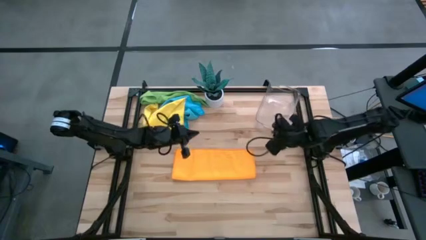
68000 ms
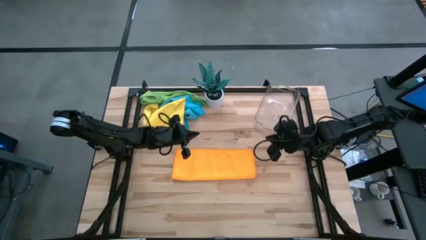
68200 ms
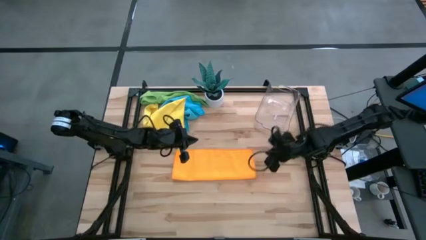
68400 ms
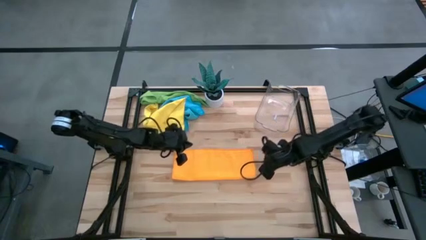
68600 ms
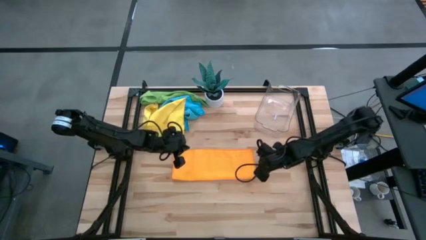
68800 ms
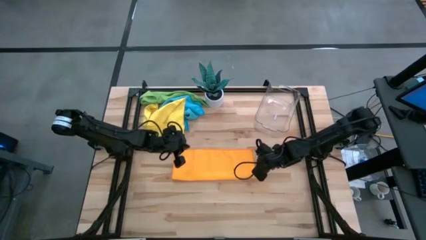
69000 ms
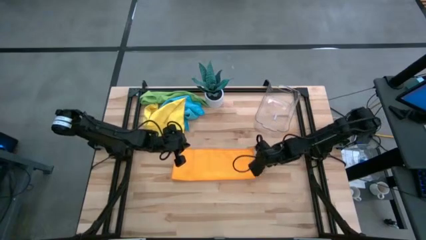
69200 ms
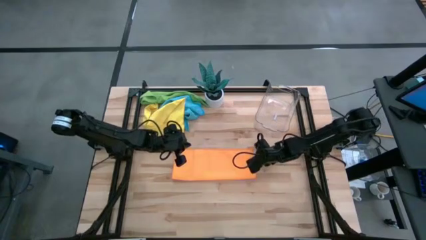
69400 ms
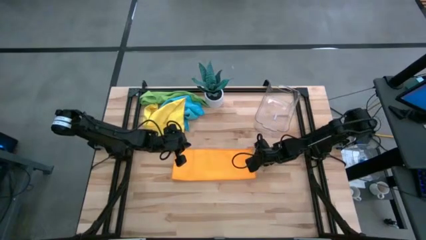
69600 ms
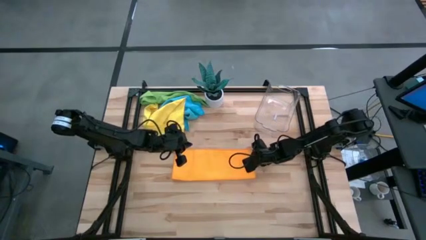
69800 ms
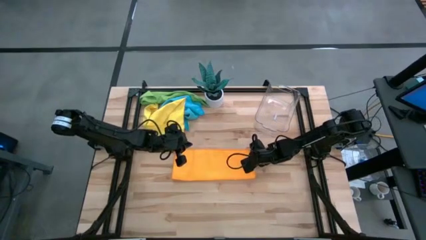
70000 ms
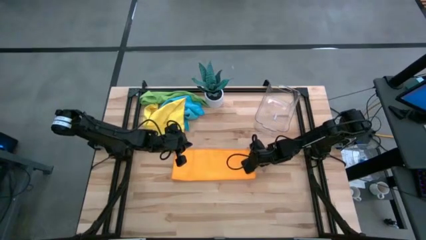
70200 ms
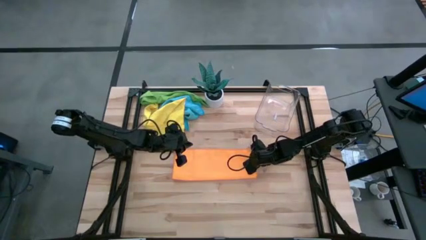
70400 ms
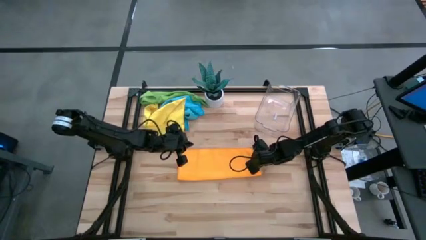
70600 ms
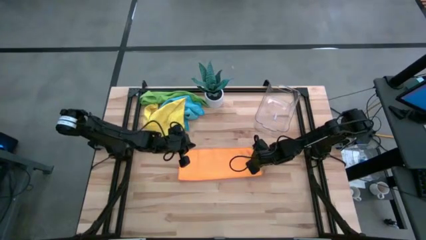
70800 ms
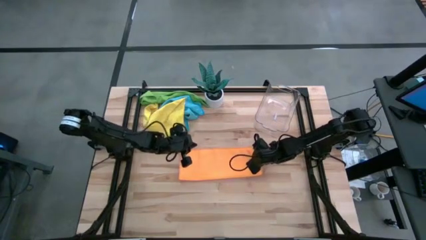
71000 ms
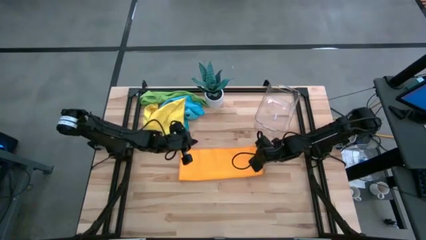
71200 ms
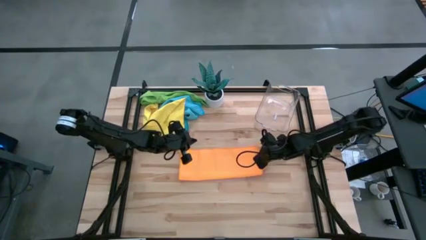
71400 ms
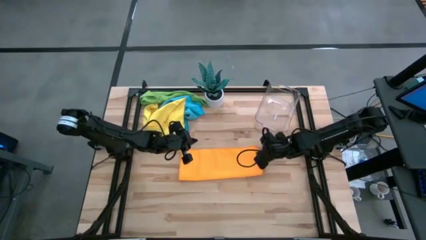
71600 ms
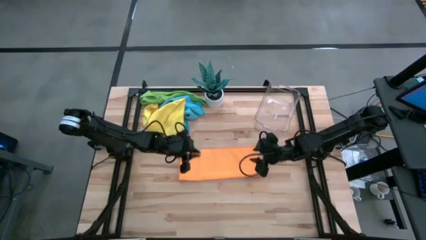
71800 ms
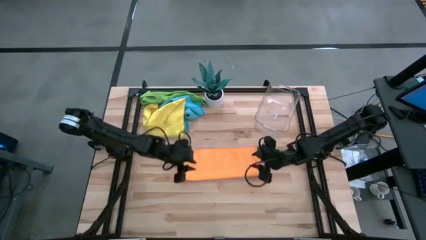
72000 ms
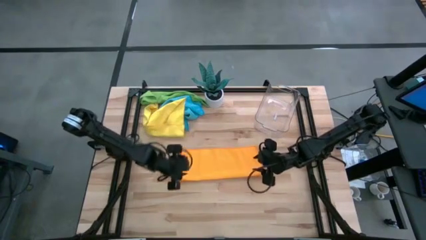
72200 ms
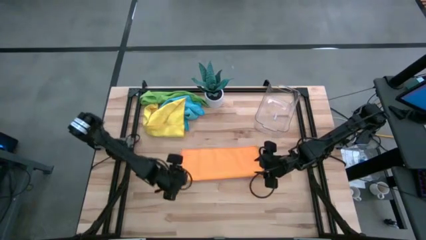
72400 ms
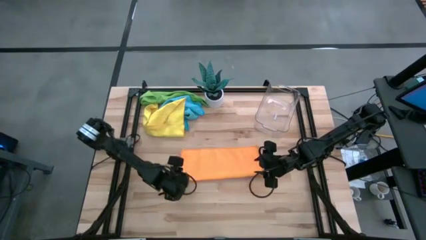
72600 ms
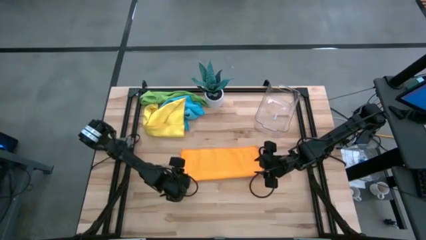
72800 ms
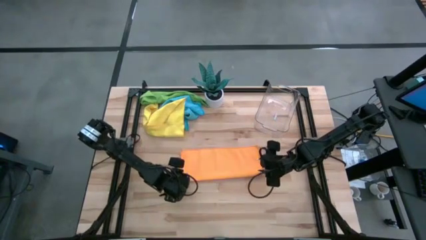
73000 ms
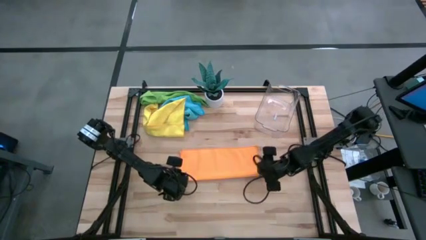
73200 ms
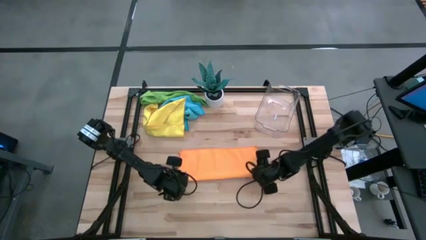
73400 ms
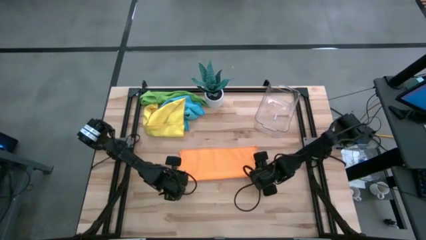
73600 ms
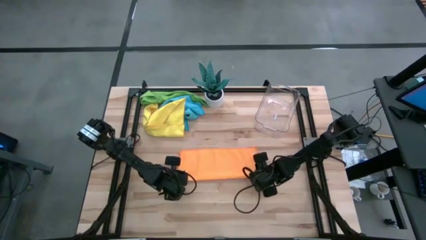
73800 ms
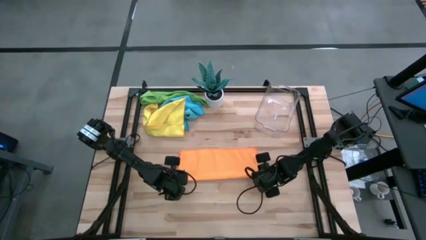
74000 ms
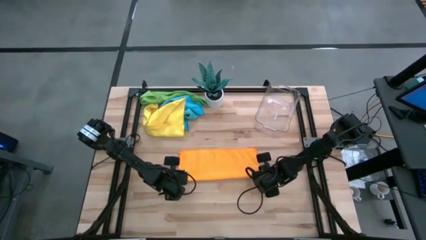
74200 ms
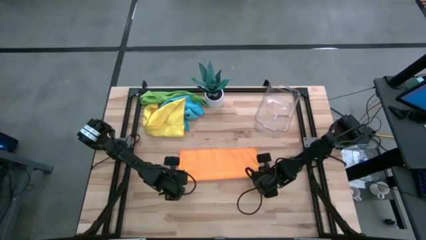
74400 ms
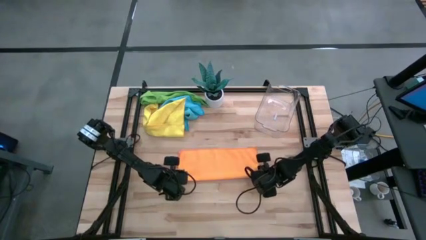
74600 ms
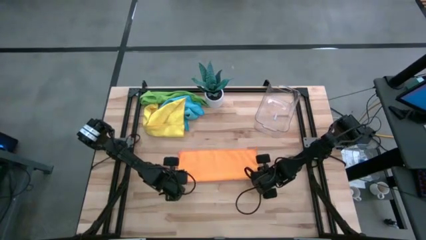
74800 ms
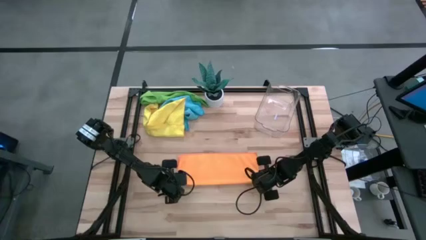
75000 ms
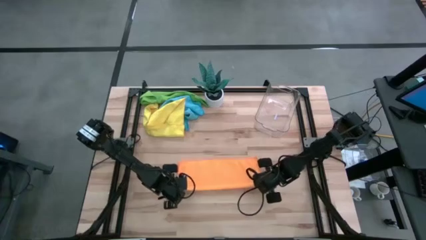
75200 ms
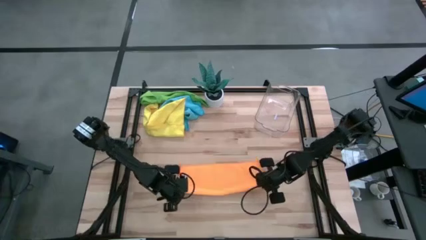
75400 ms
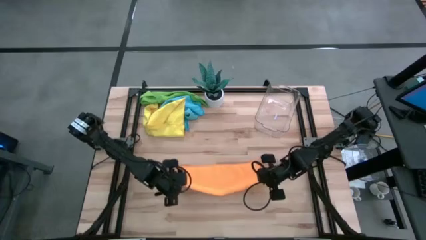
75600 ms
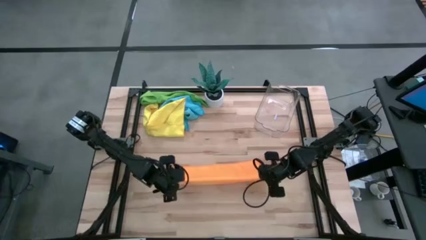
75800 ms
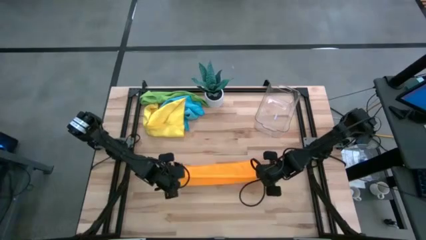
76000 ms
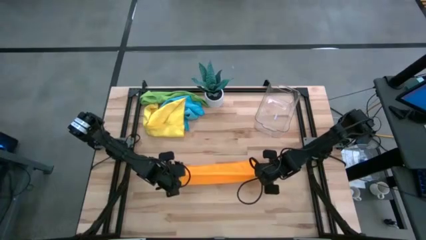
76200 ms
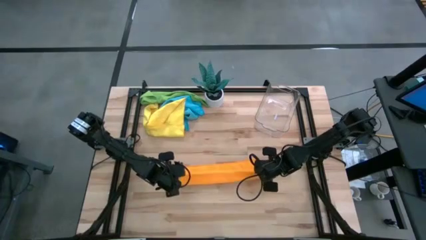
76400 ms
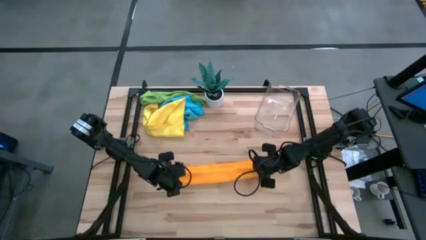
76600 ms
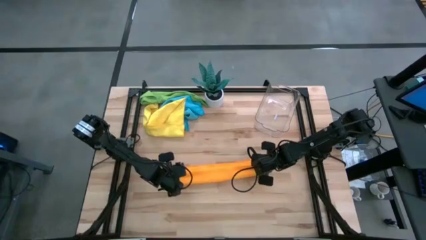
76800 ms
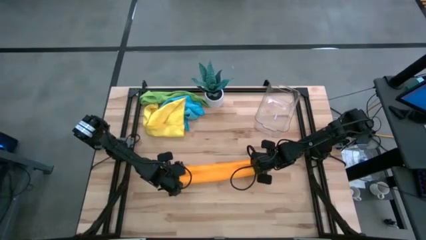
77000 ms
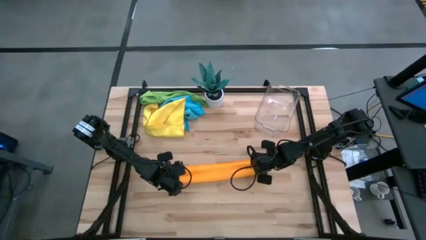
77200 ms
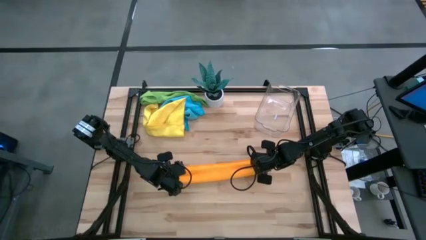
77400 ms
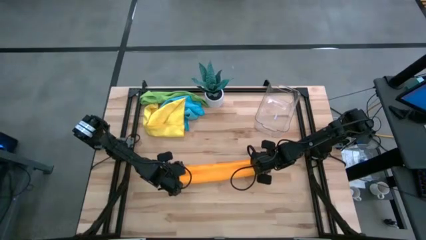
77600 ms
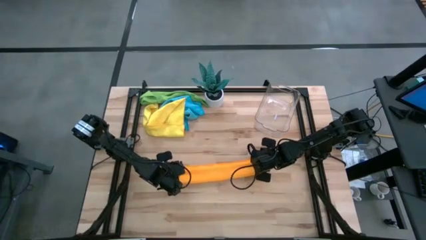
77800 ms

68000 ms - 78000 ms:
Task: Roll microfiber towels into tight, uniform cylinder then place into a basket
Fold the orange microfiber cloth

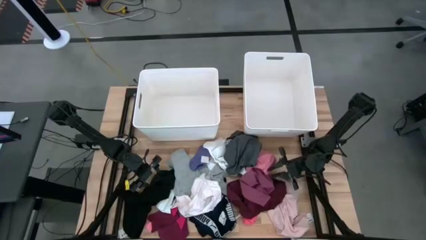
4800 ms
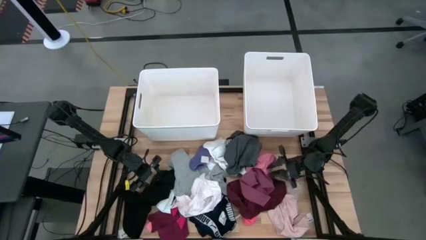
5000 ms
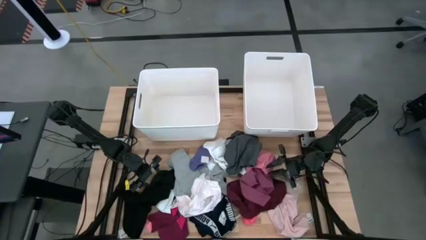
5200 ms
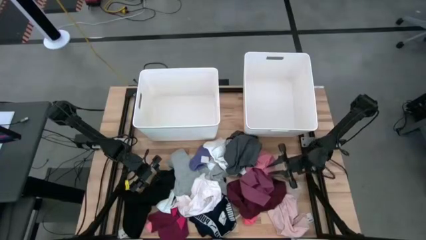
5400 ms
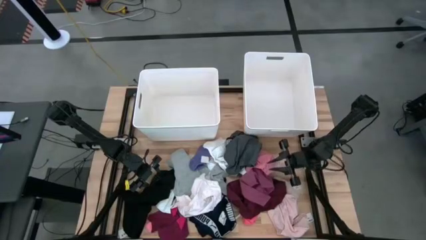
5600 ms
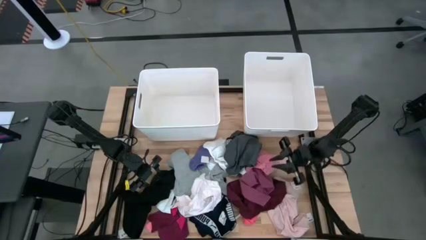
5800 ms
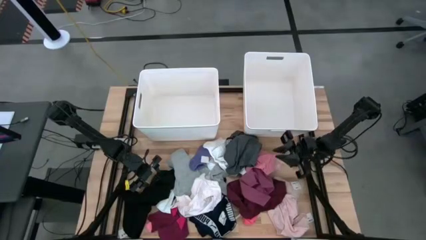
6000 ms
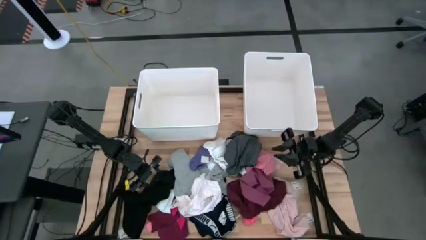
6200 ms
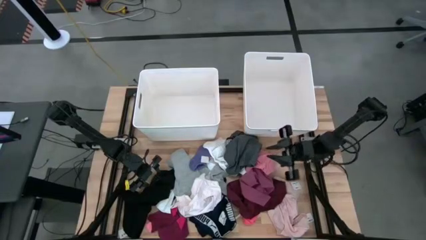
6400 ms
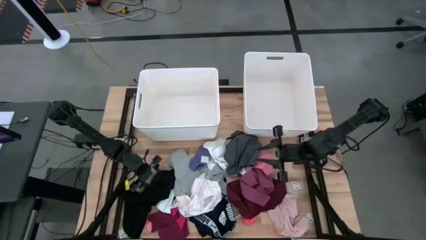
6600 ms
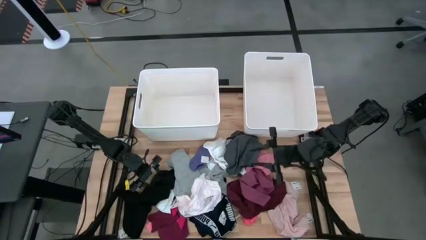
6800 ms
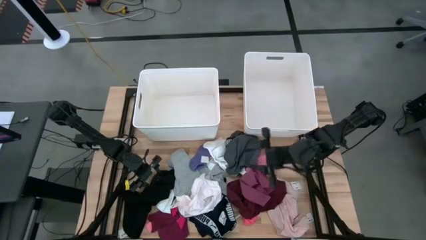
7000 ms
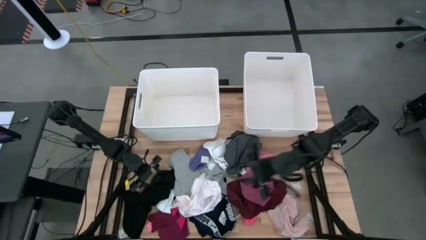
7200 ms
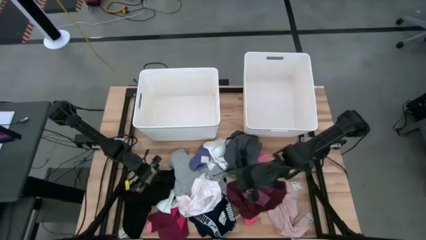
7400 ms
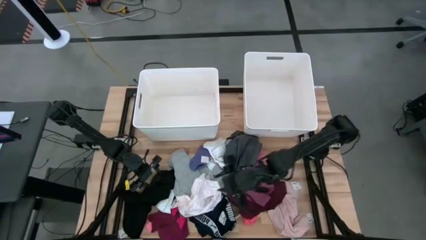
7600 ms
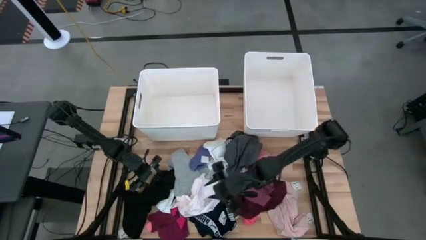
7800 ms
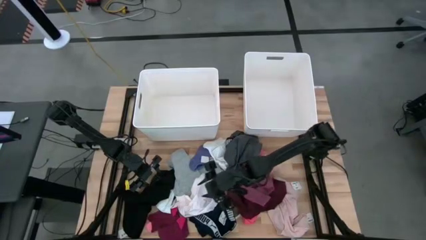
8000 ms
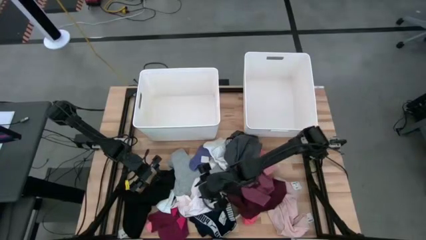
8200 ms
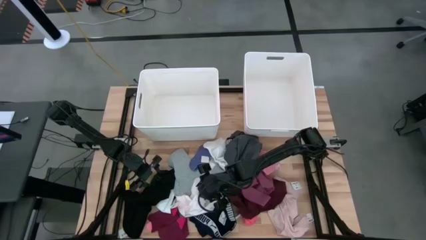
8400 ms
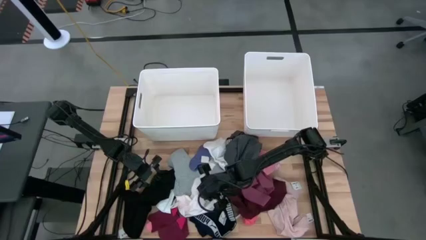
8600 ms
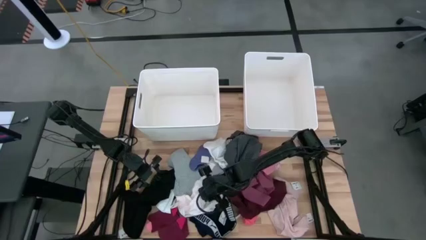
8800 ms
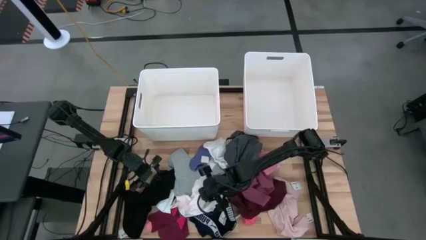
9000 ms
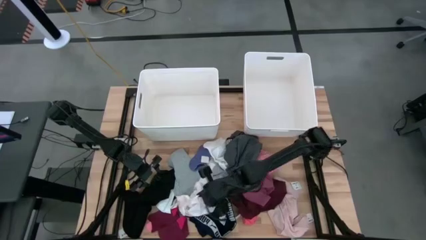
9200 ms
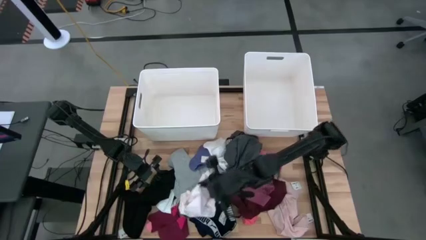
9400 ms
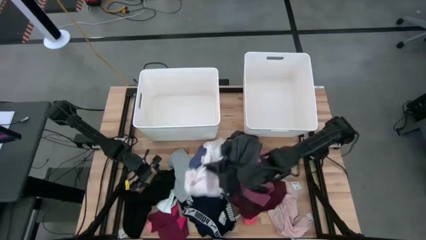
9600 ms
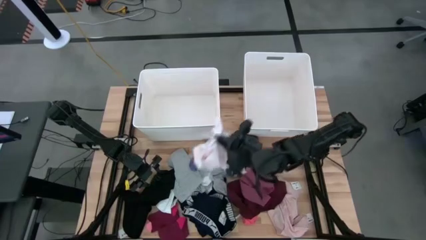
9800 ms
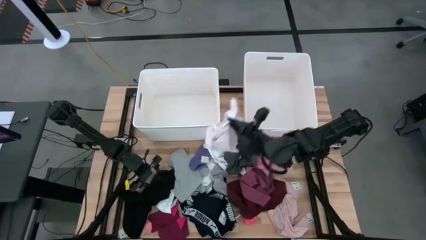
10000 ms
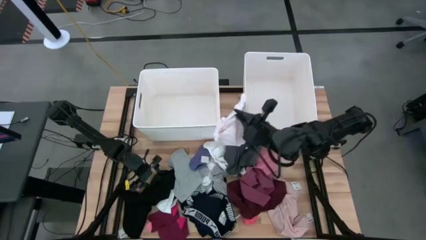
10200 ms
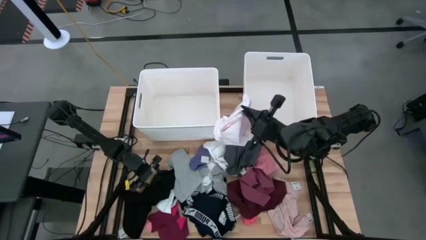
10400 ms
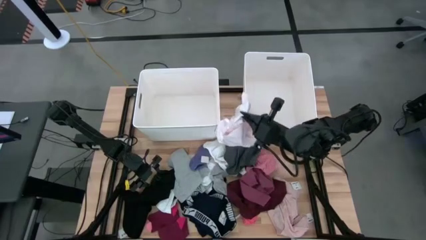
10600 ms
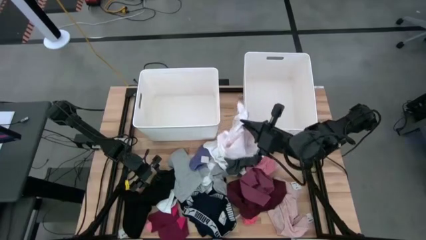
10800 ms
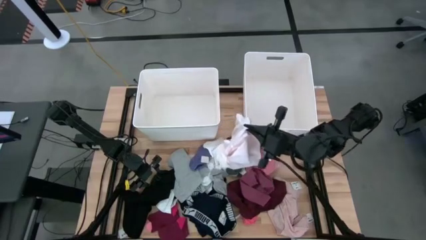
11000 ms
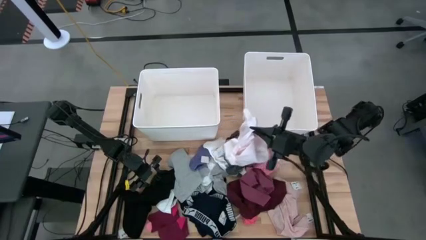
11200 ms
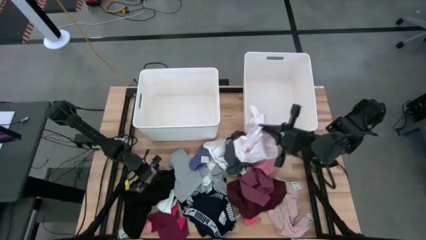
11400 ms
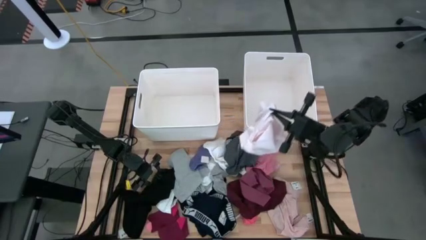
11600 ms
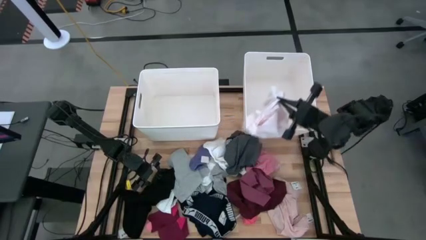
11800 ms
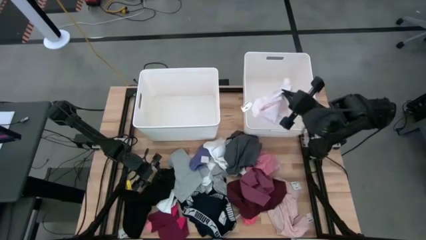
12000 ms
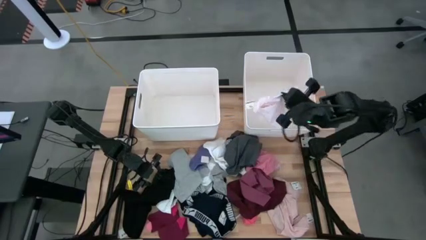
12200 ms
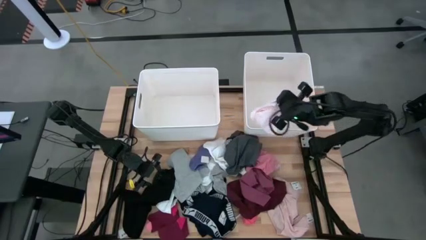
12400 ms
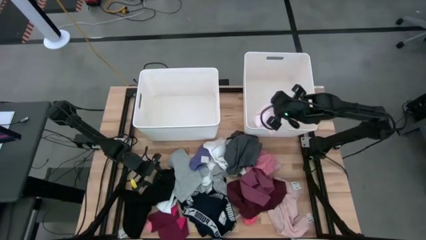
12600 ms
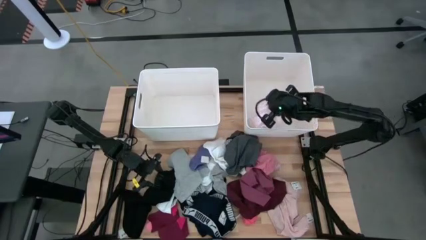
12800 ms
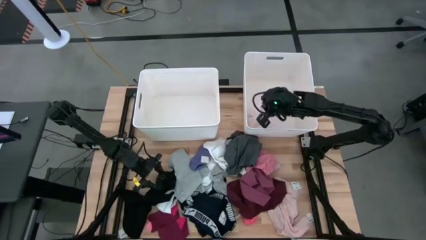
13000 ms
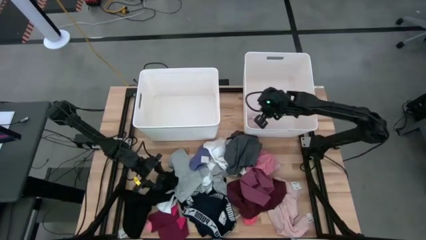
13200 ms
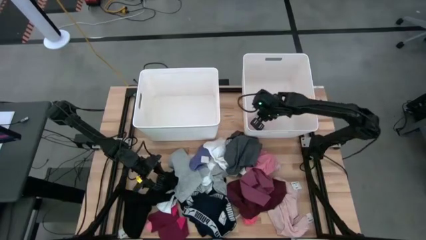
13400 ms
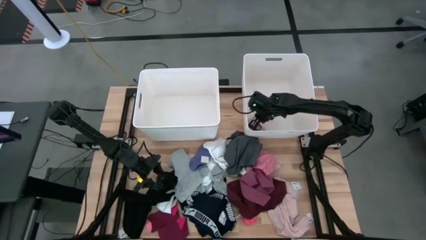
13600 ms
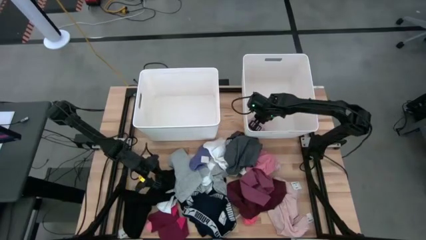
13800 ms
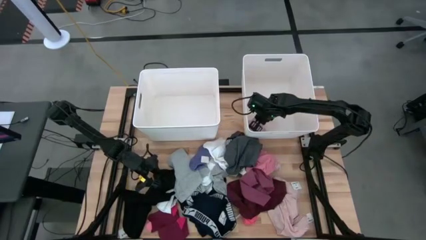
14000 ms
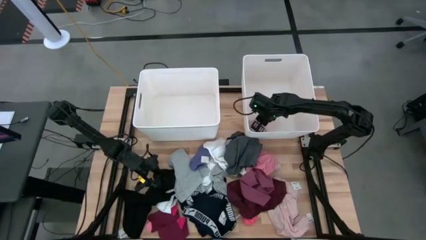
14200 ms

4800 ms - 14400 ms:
Task: Sort clothes
Put the light pink underwear into the right white laundry organizer
